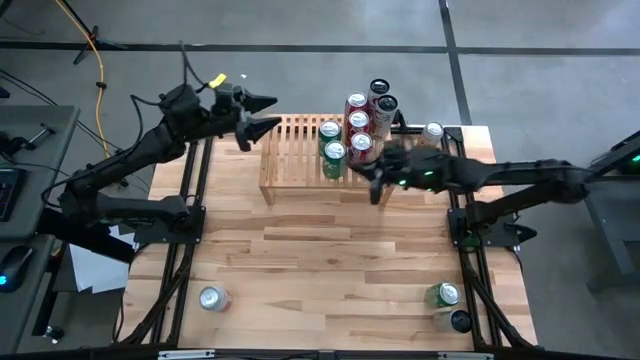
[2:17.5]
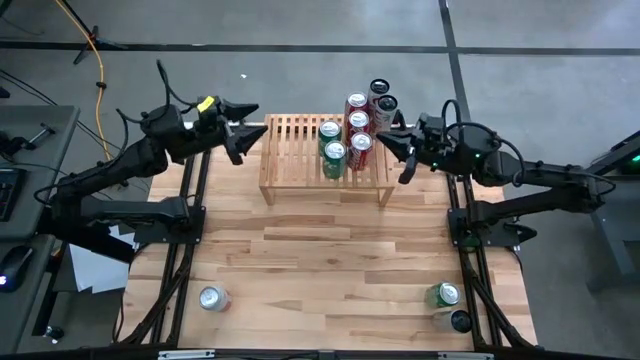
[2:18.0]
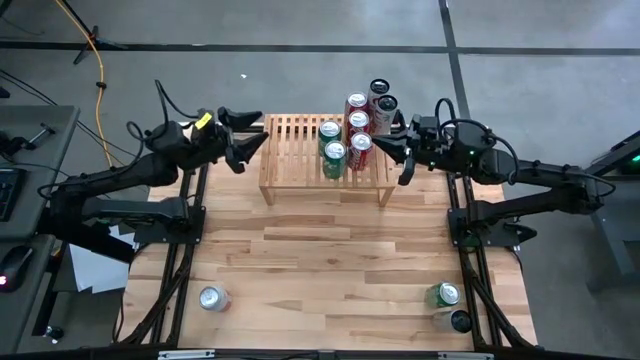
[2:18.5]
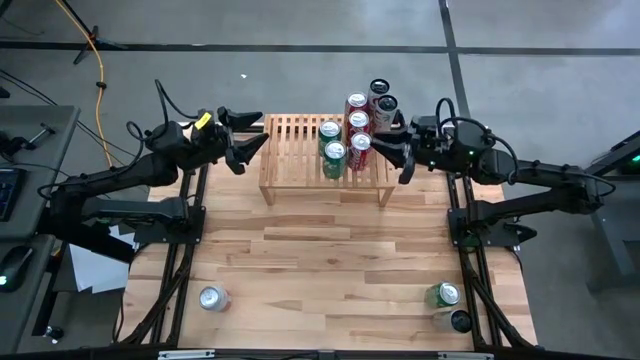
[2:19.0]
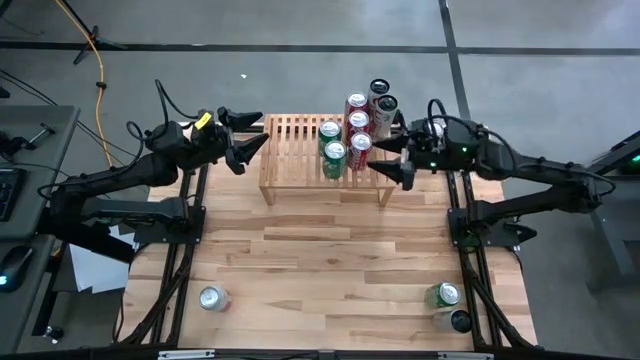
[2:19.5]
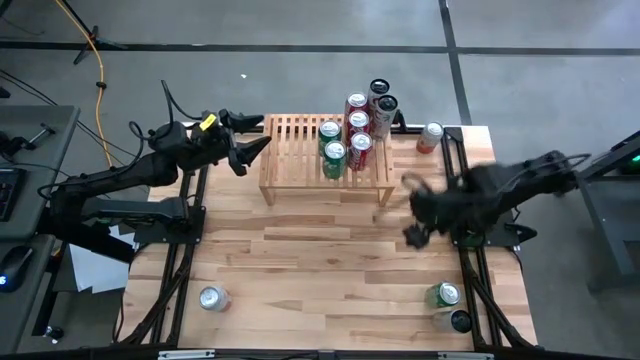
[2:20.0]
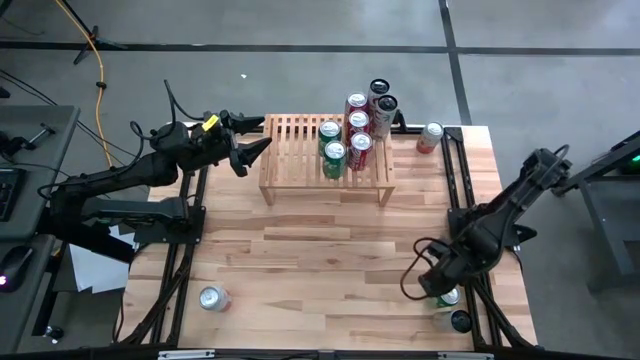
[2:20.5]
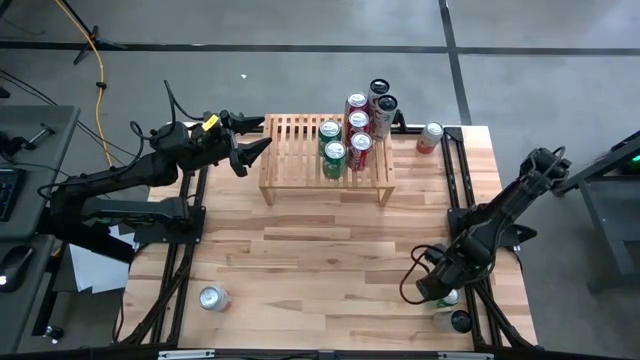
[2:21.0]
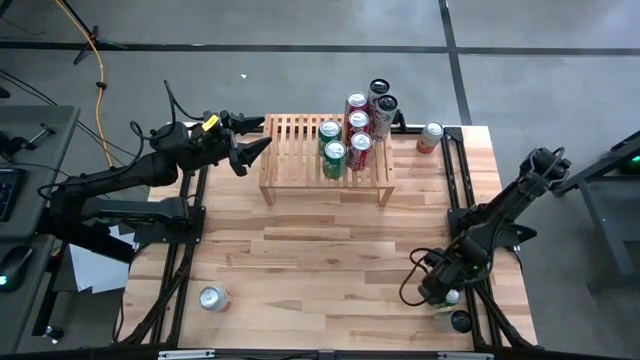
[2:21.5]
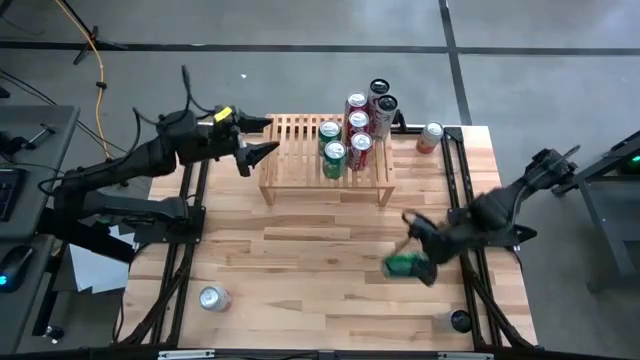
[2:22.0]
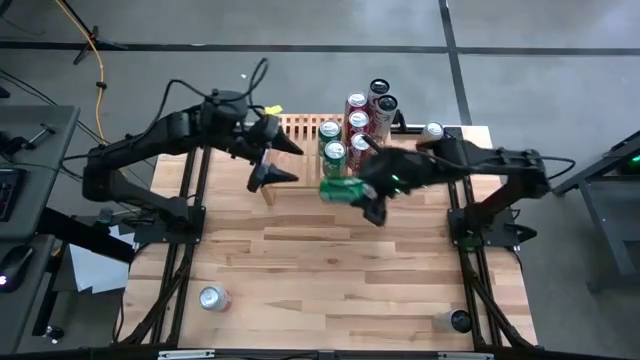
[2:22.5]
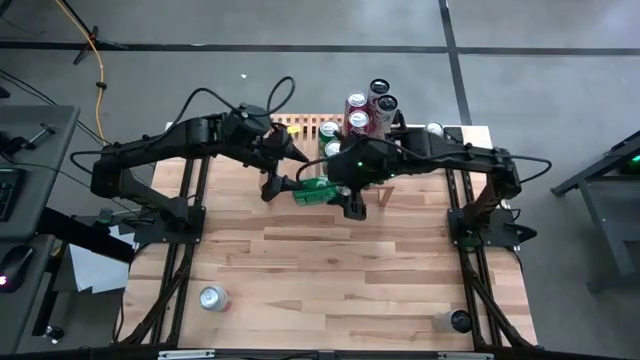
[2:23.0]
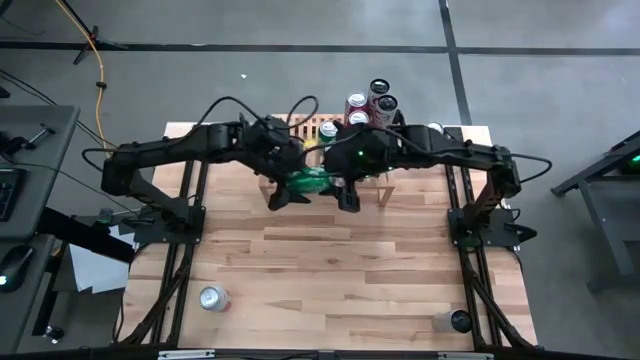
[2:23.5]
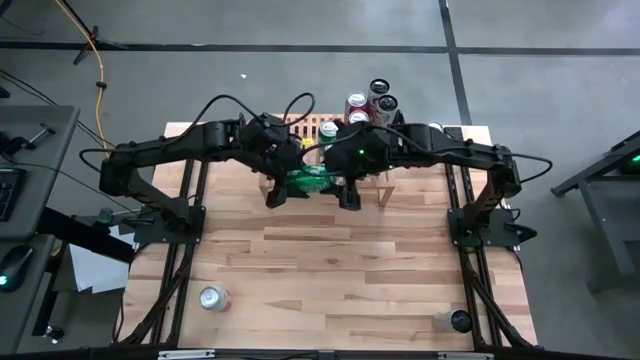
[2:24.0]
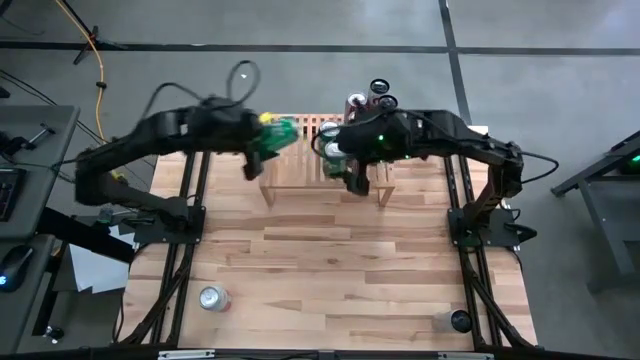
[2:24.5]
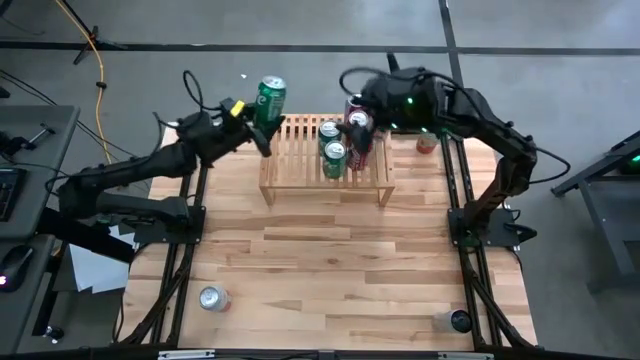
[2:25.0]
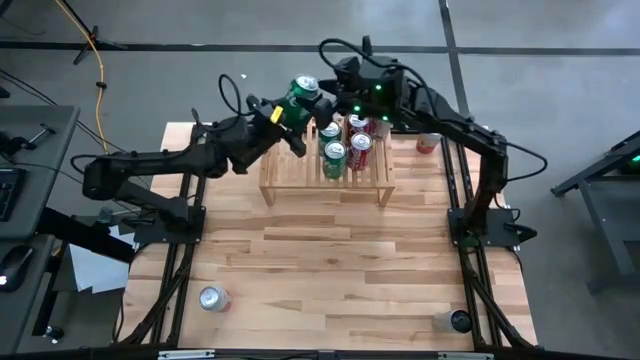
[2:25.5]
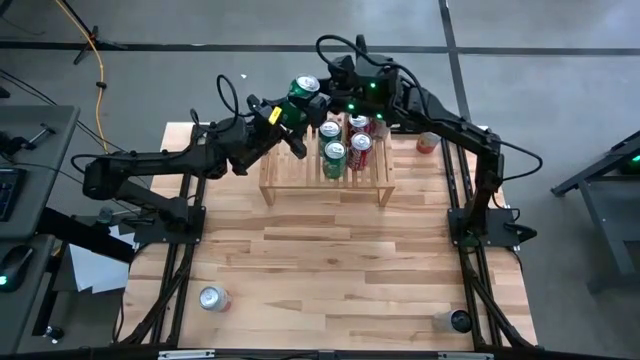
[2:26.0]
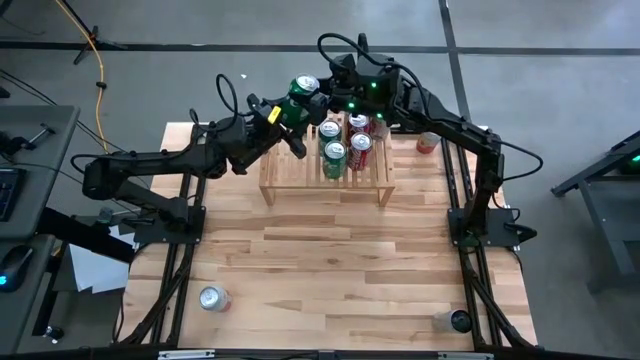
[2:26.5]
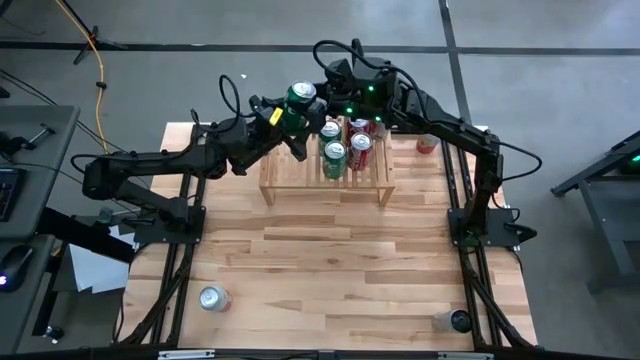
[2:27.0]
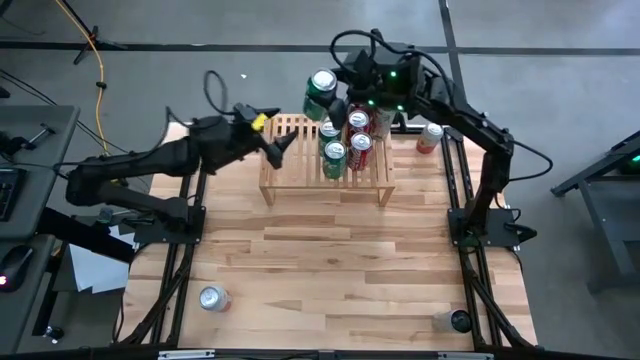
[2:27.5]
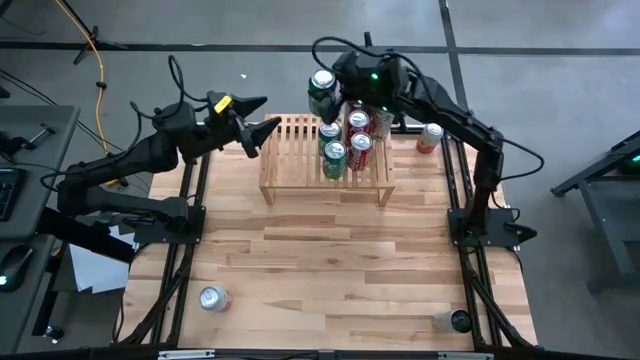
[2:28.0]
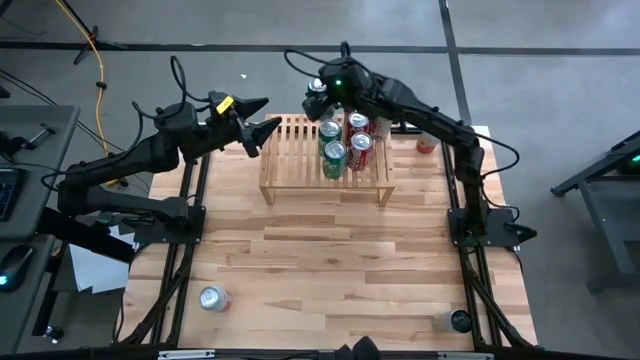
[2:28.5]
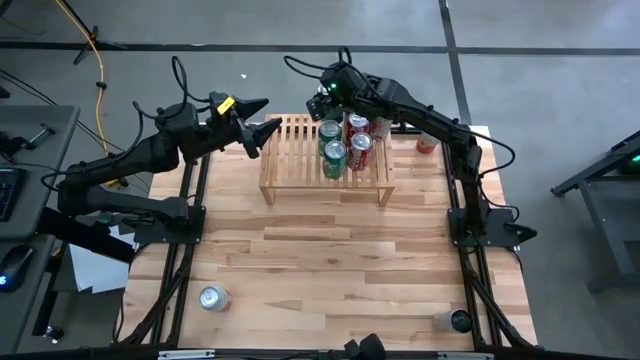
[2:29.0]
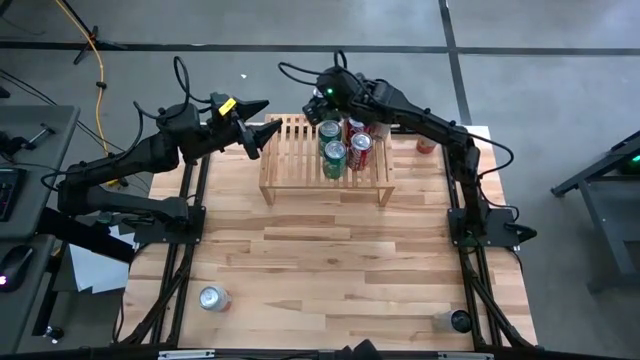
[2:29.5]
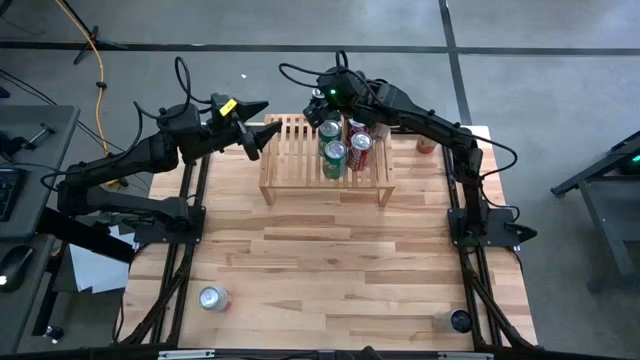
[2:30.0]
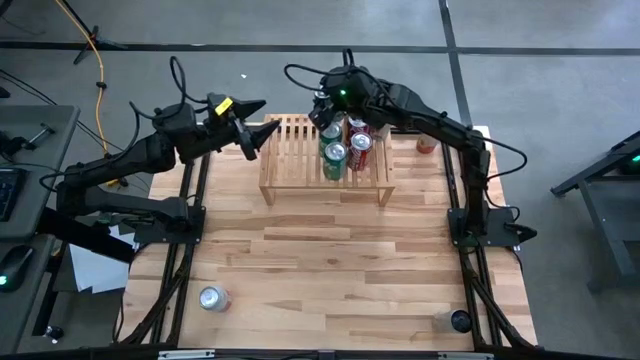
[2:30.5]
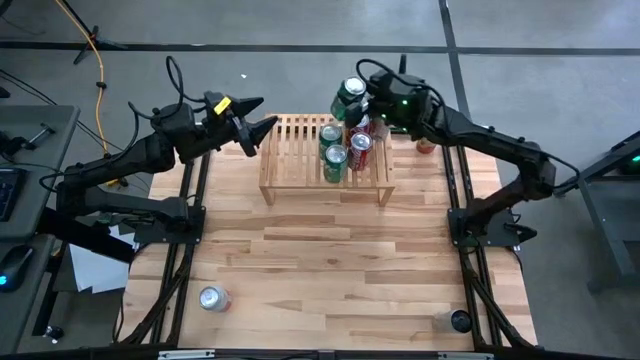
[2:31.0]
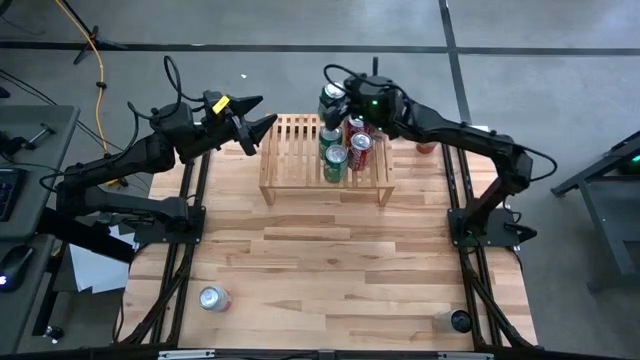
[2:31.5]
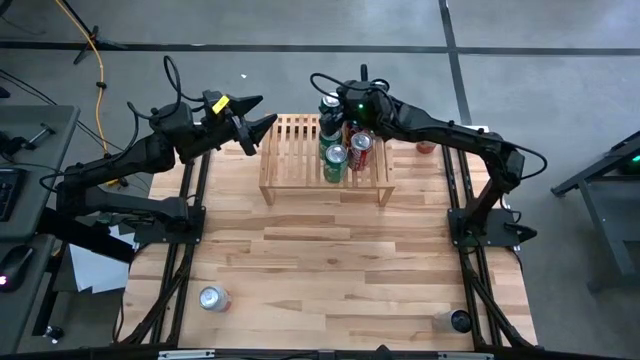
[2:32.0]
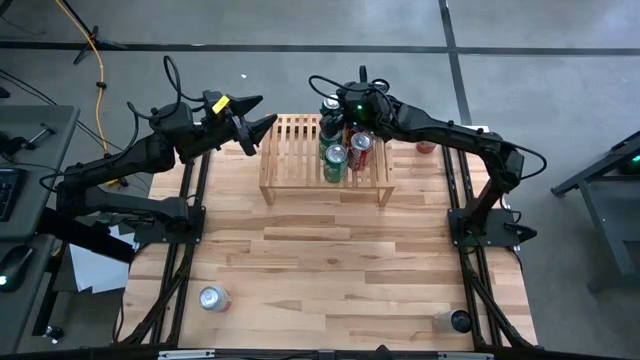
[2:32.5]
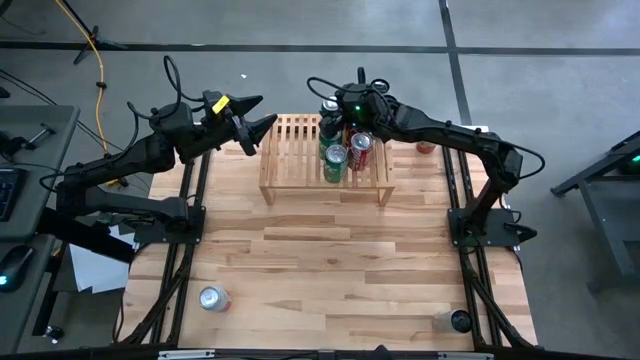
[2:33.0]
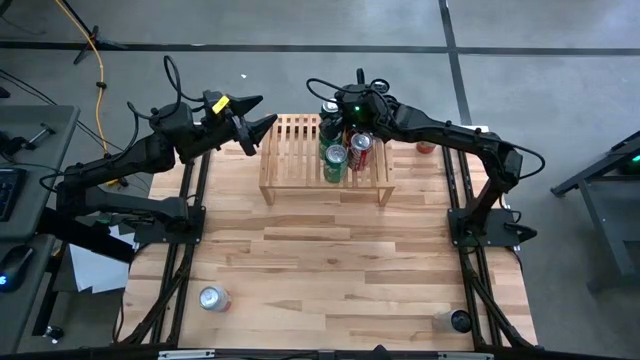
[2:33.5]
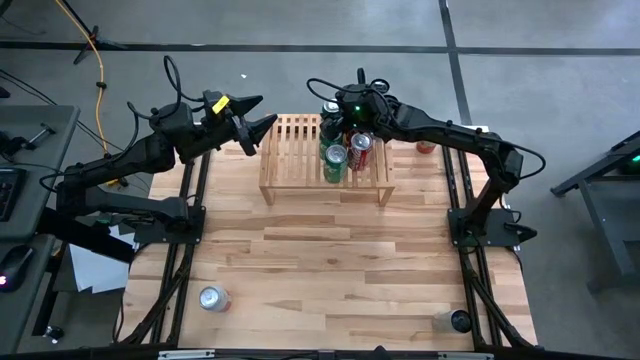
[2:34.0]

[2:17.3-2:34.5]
Task: Place canned beverage on shelf
Put the green soda can on the shelf aligned with the other green soda cans

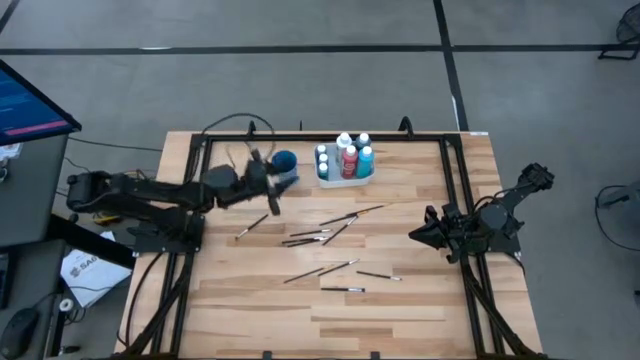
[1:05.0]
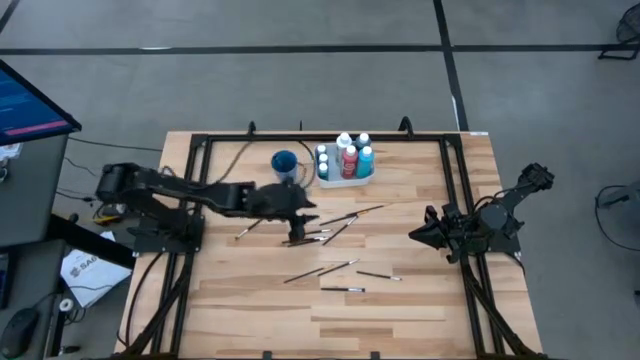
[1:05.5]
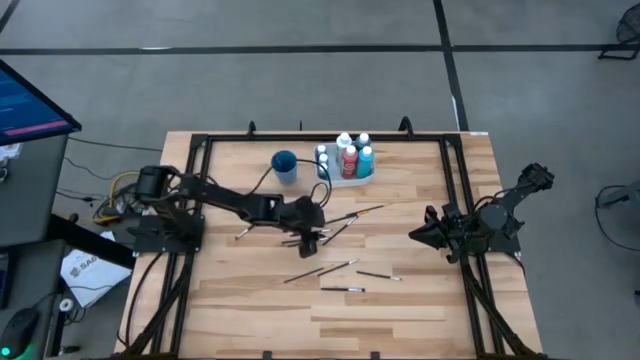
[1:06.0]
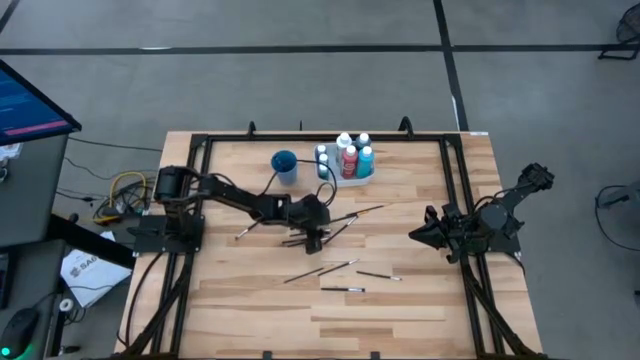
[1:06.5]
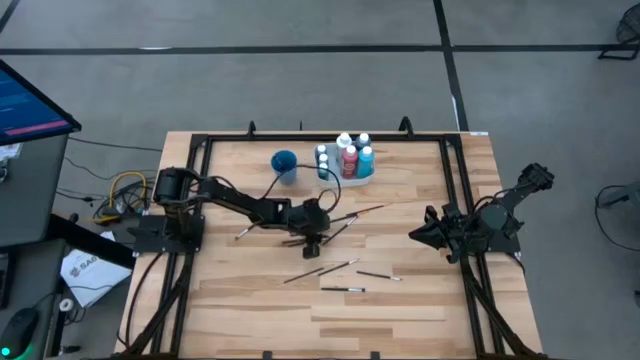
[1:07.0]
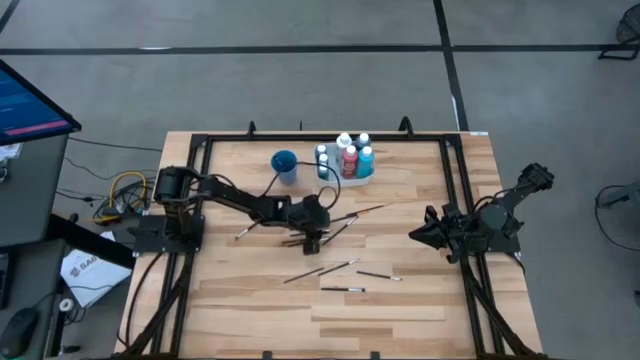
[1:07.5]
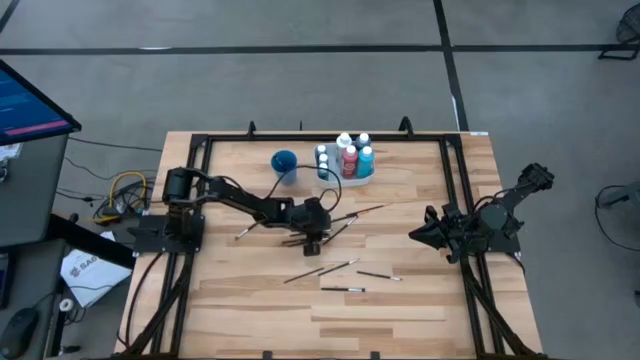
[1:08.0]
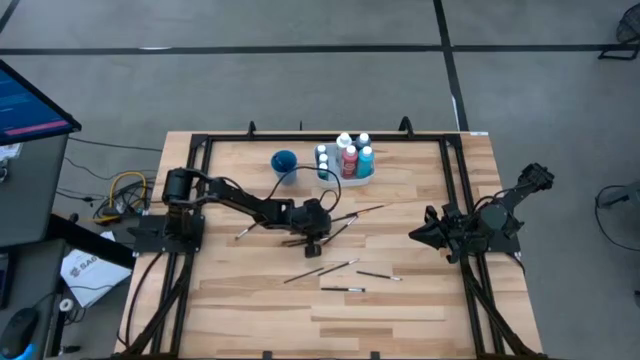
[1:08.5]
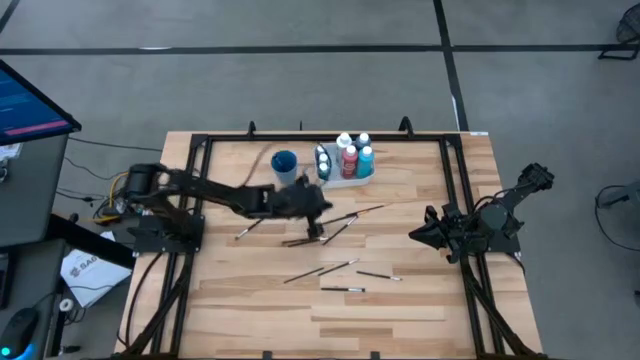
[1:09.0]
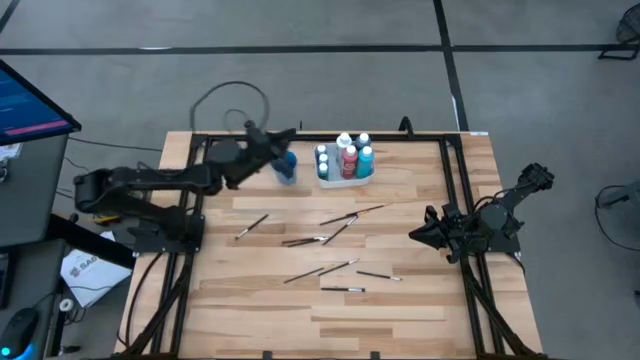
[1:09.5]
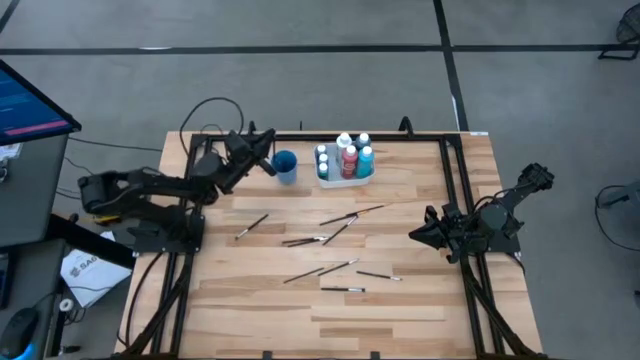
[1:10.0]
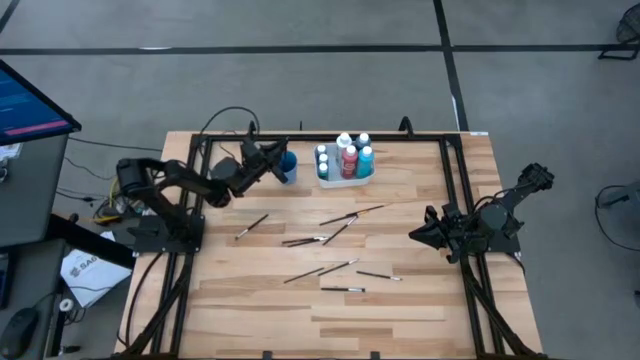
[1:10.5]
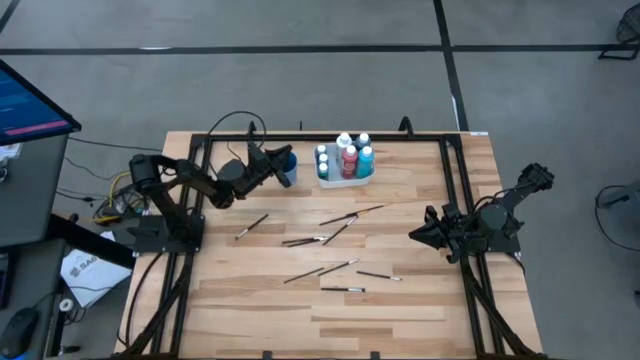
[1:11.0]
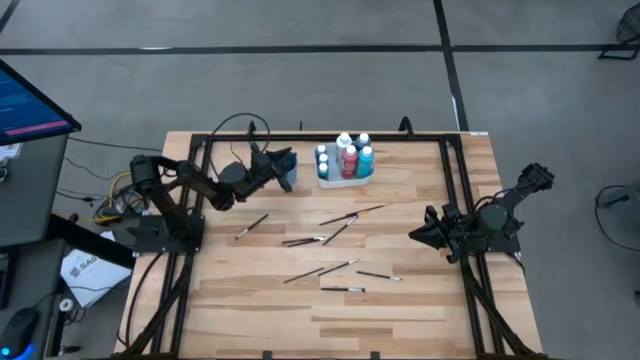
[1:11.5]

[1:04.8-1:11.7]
Task: Pick & Place Paint Supplies
Put the silver and black paint brush into the blue cup
